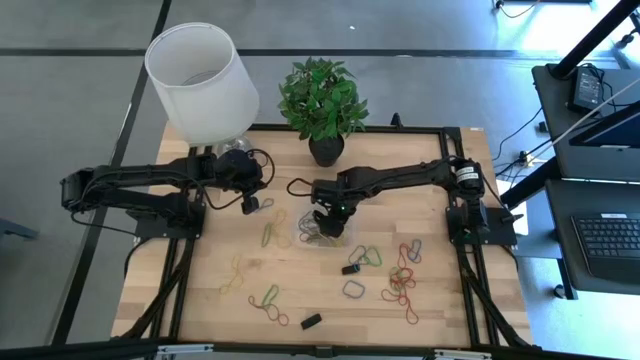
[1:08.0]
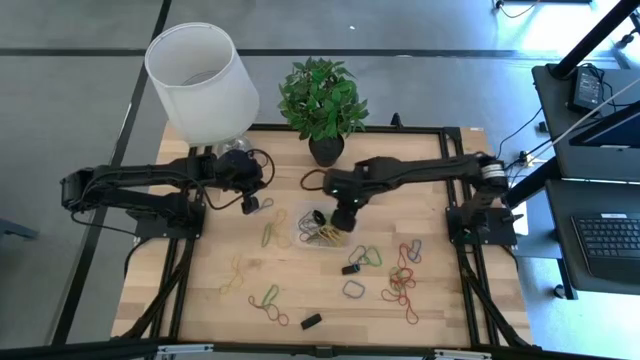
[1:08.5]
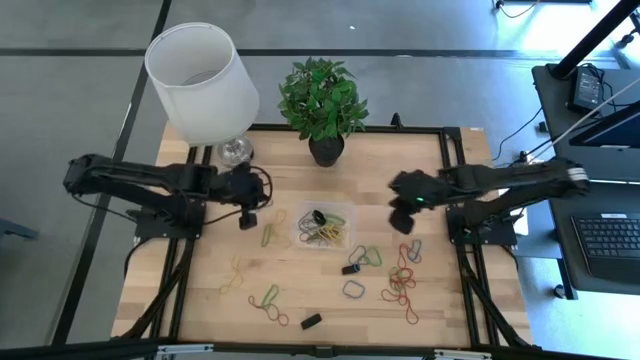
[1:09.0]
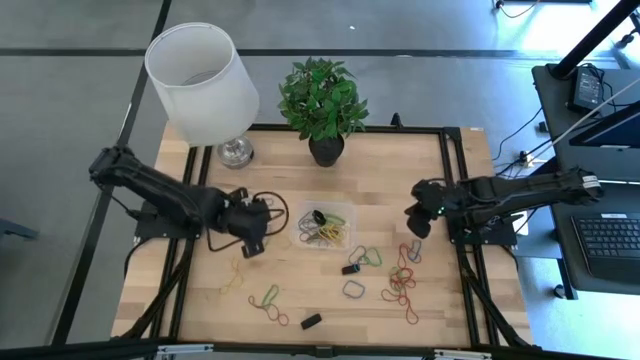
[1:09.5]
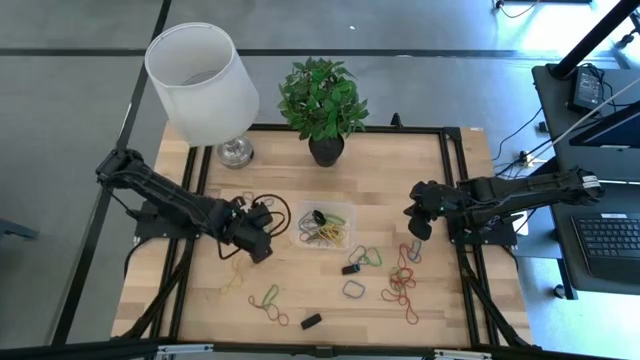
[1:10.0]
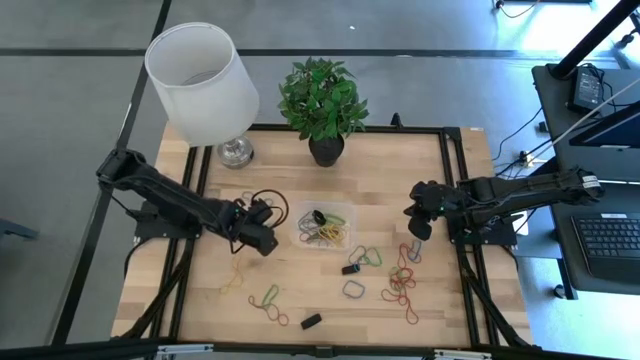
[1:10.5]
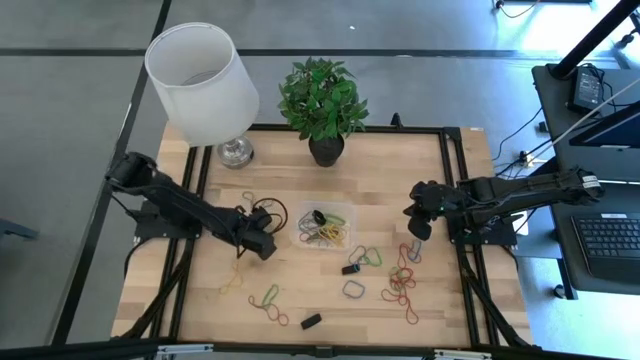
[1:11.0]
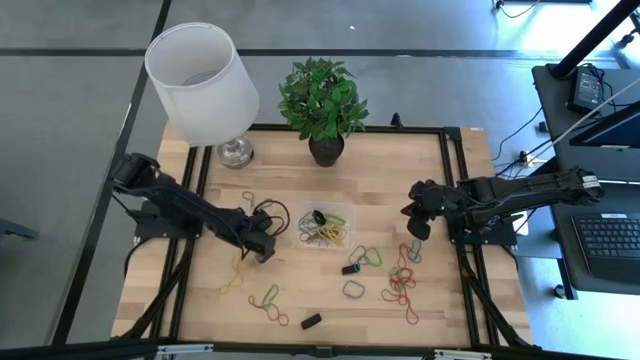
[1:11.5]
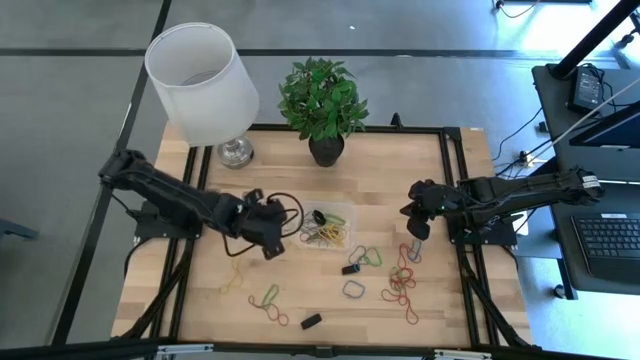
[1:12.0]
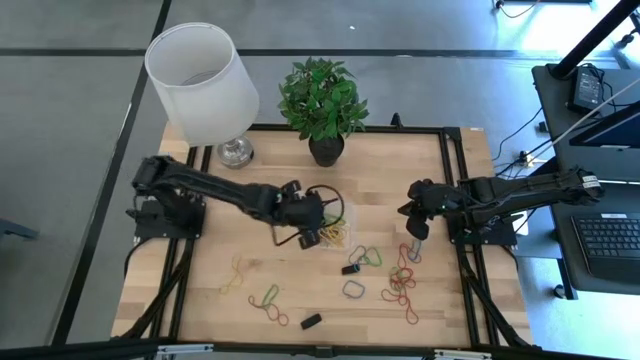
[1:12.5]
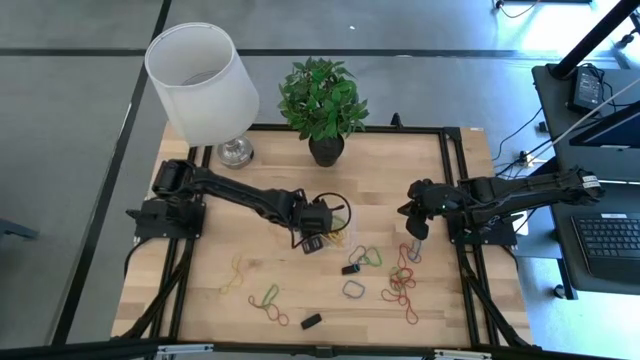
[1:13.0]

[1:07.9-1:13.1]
Task: Pick and place rubber bands into bin
Put the green rubber band into the transparent container

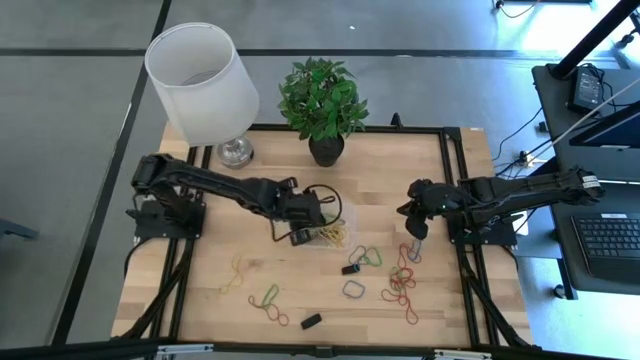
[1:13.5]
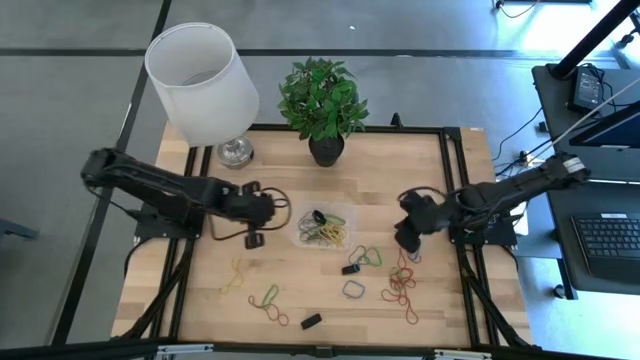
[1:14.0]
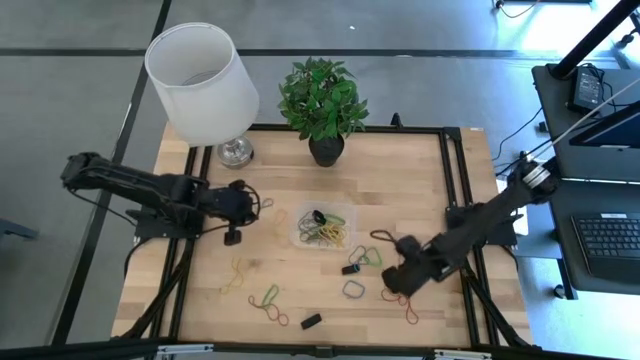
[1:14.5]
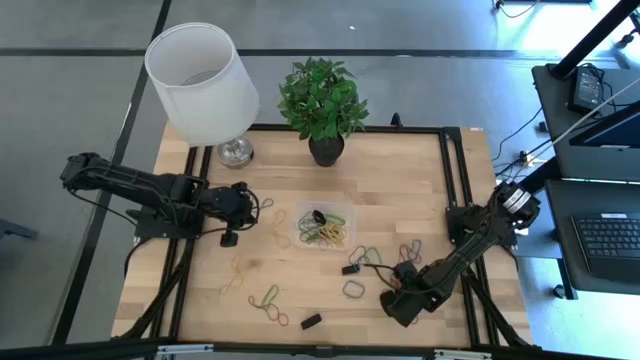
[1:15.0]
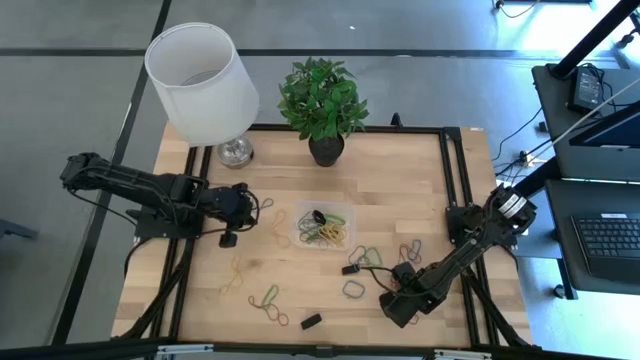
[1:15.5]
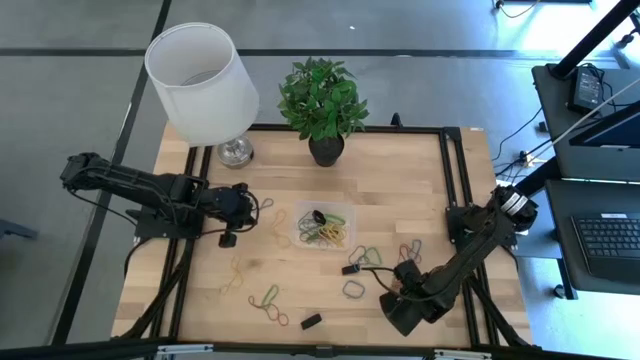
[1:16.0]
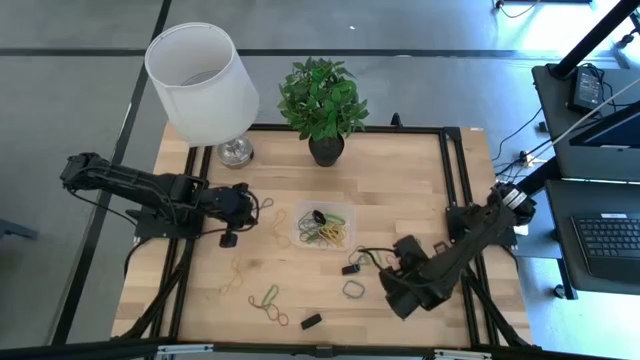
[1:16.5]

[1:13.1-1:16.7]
Put the red rubber band into the transparent container

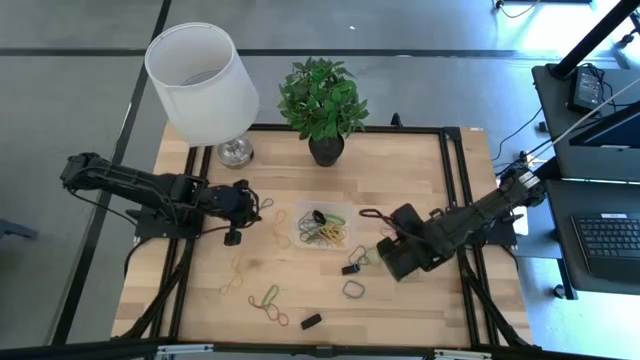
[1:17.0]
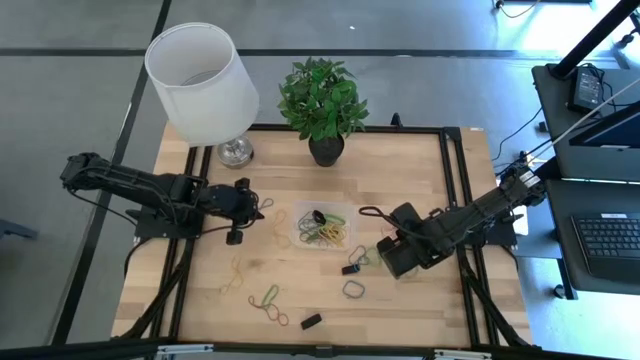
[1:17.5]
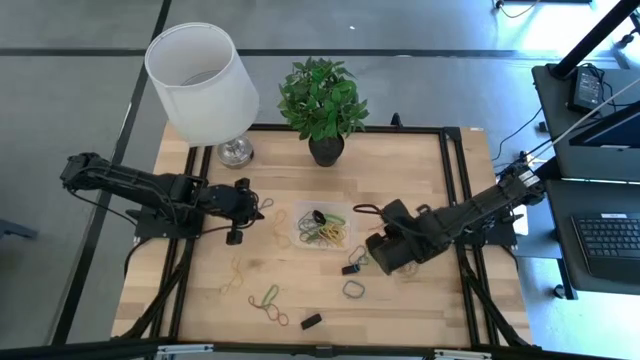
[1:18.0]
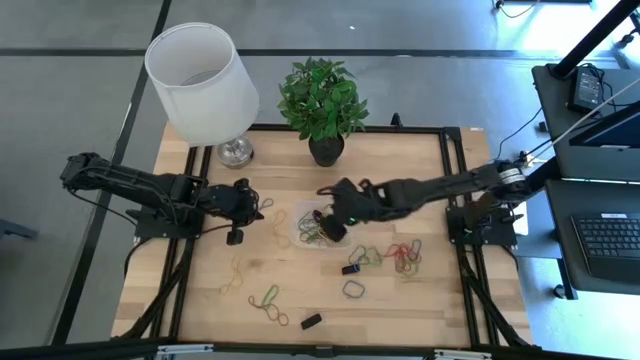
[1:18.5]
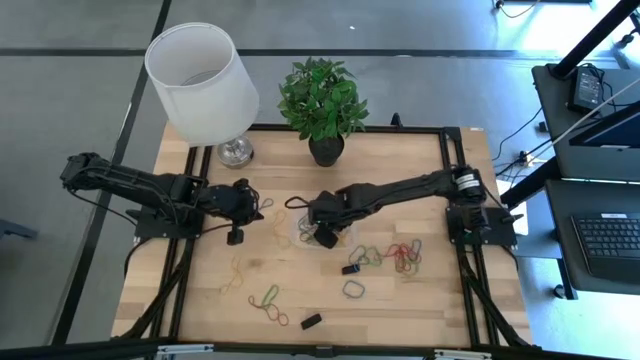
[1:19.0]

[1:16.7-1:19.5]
Put the red rubber band into the transparent container

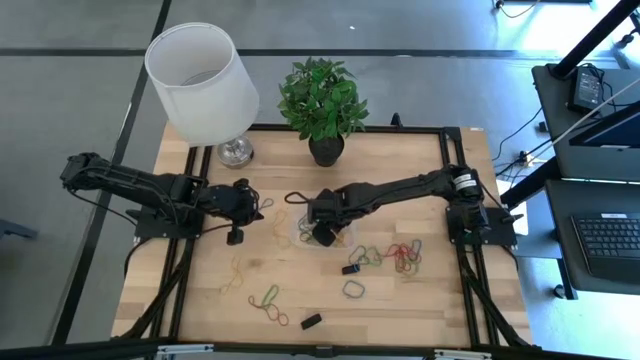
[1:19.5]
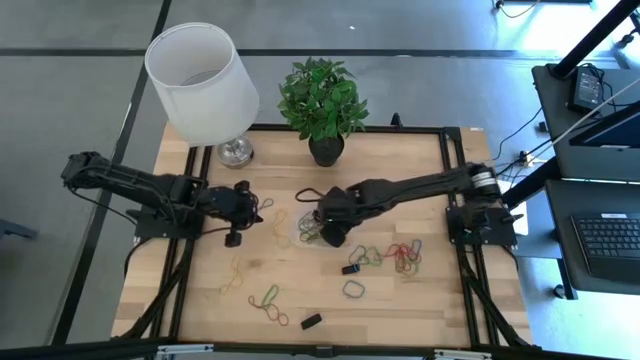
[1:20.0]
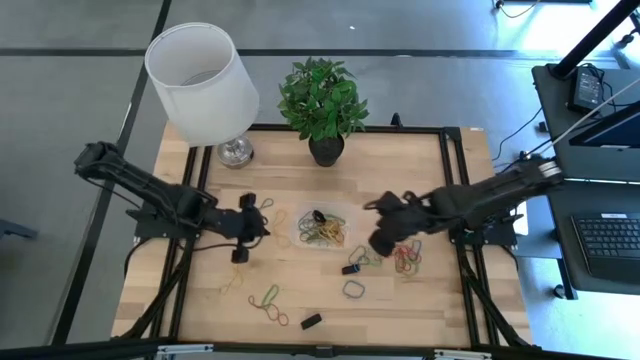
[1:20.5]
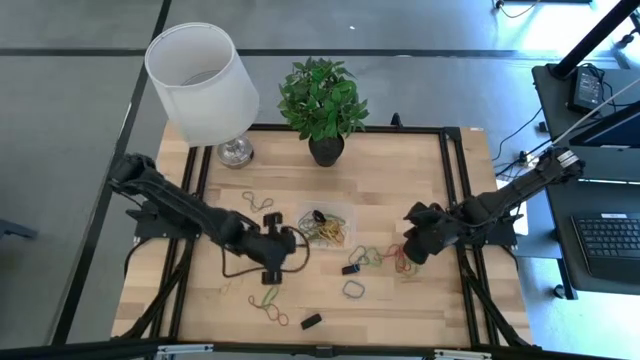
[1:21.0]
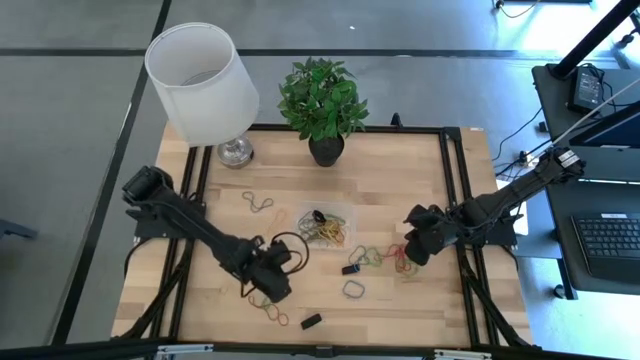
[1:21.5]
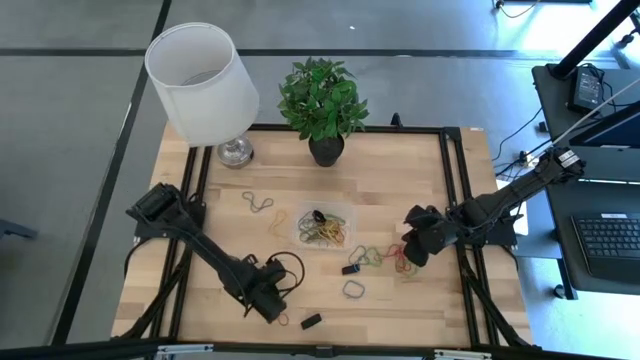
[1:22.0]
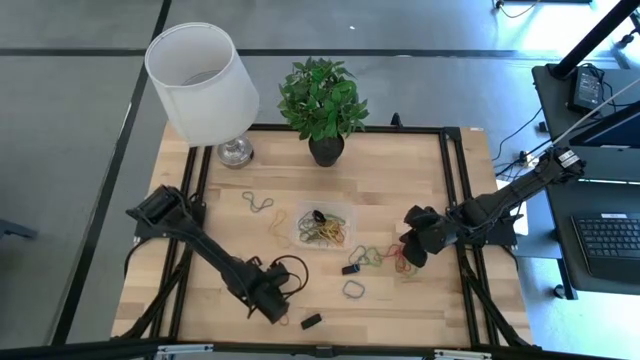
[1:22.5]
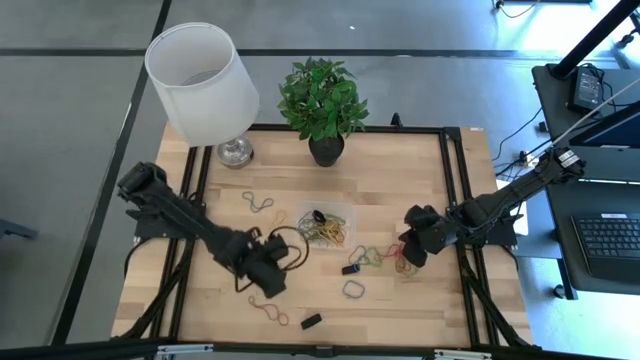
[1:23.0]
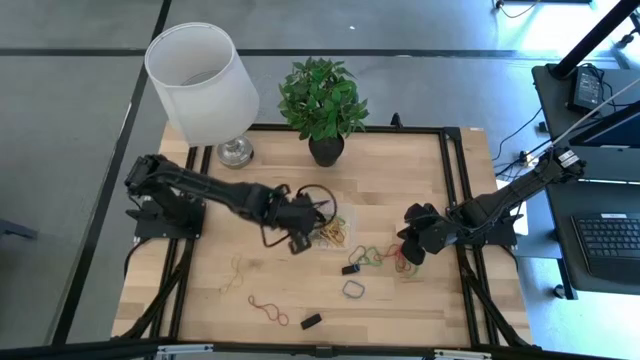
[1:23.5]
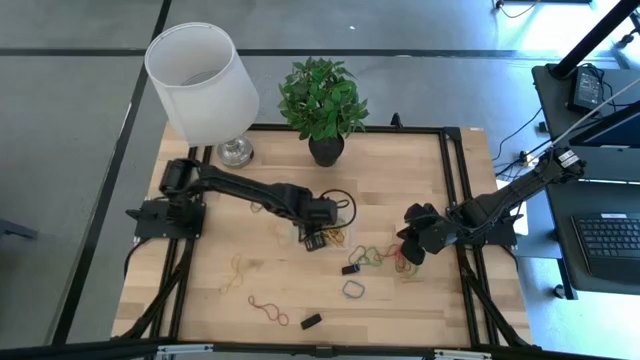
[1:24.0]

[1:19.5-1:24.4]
Put the bottom green rubber band into the transparent container

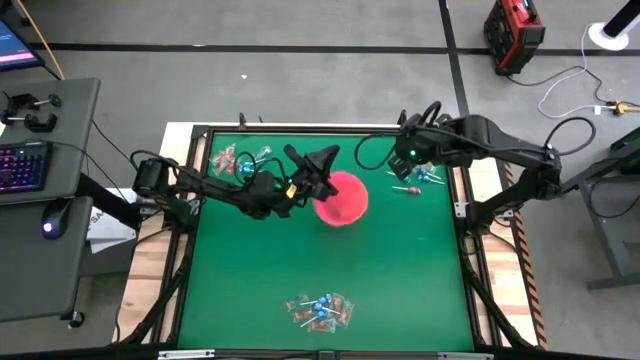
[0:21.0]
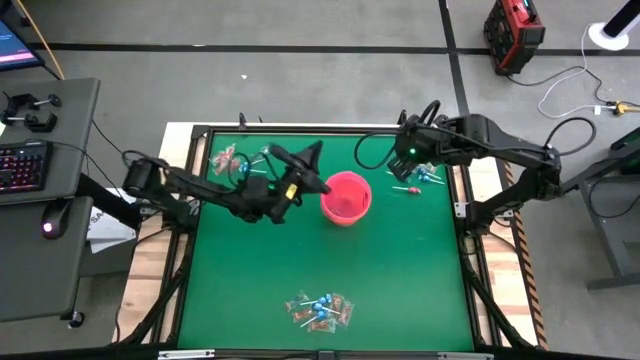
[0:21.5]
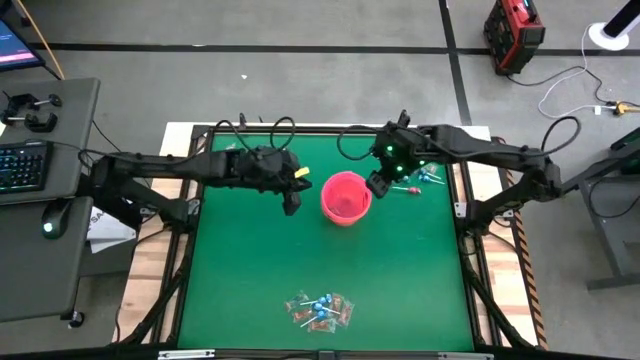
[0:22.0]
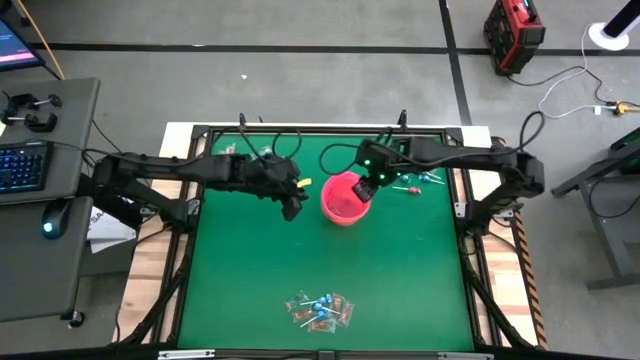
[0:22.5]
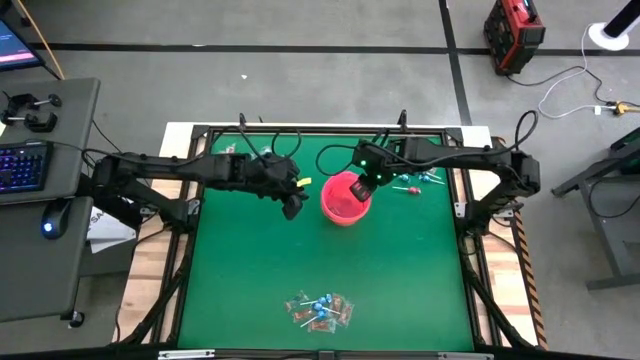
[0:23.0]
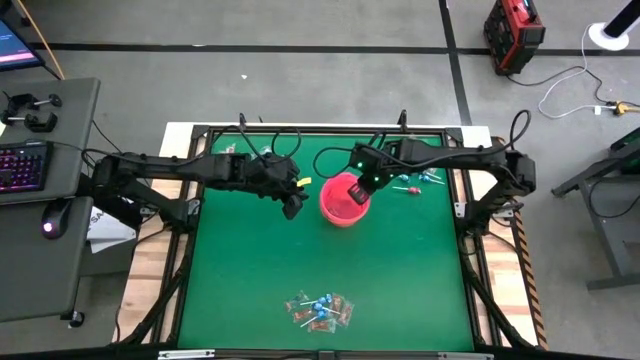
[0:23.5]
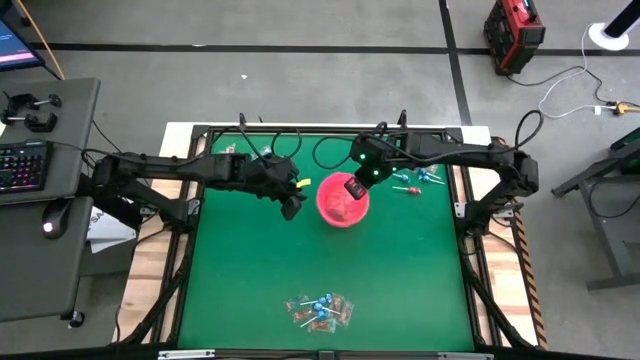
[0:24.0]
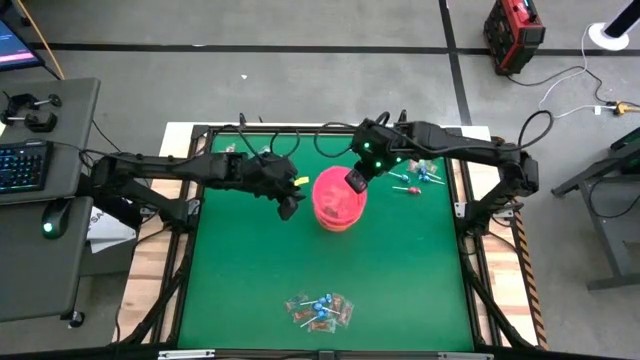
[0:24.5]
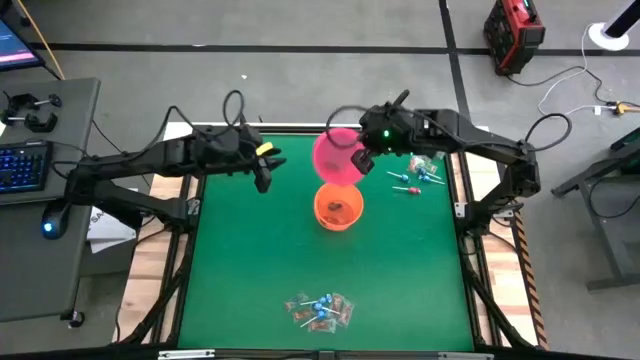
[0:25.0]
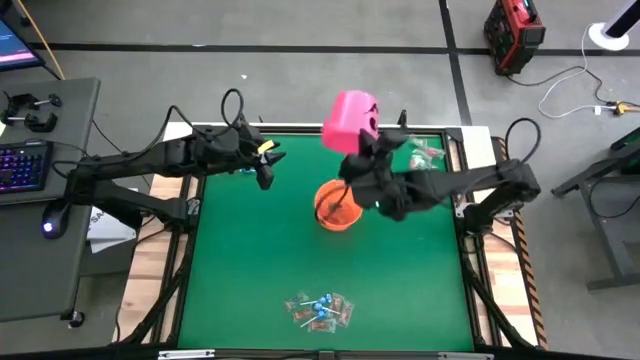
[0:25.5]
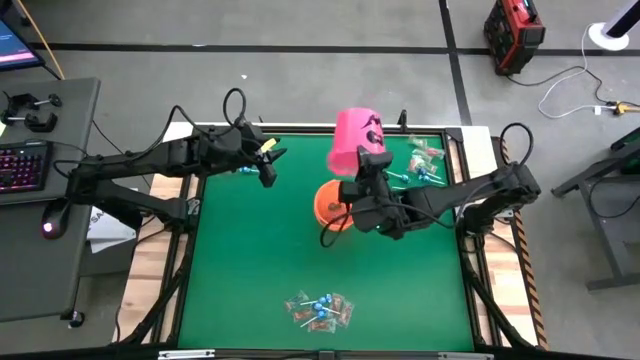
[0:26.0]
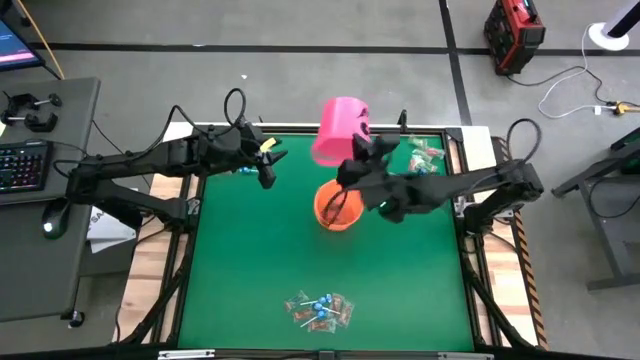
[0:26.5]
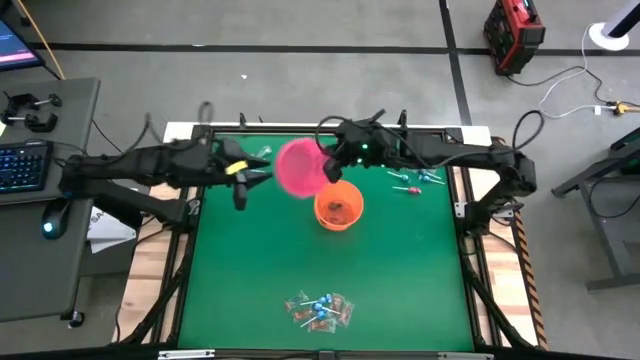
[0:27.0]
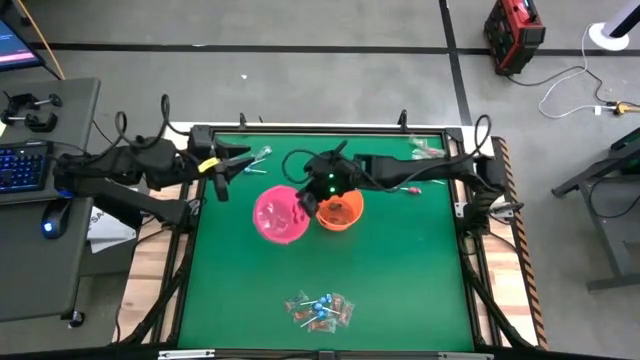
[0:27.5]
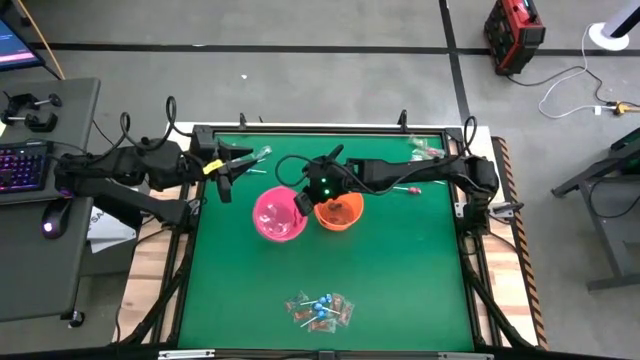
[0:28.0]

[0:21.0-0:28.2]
Task: Sort candy by brand, put in halloween buckets
Put the green gummy from the pink bucket to the orange bucket
